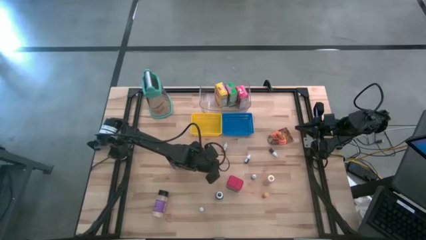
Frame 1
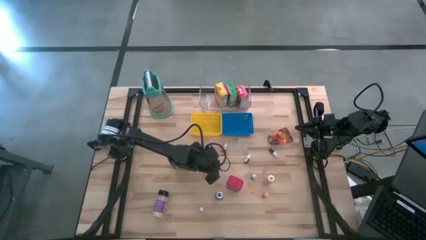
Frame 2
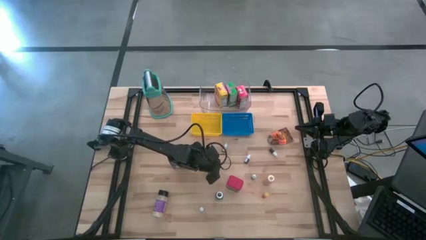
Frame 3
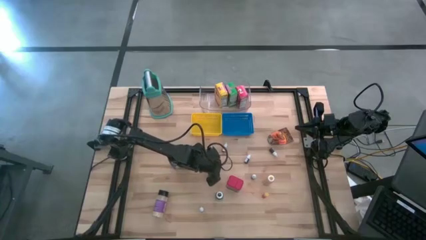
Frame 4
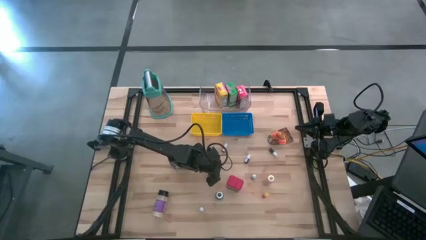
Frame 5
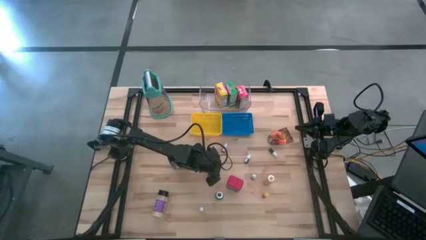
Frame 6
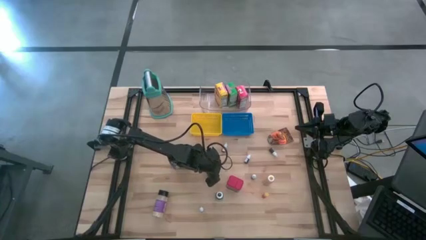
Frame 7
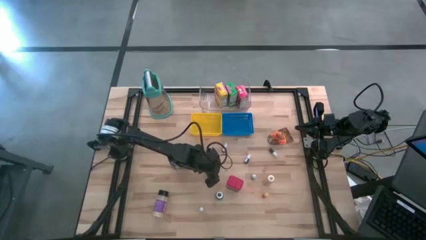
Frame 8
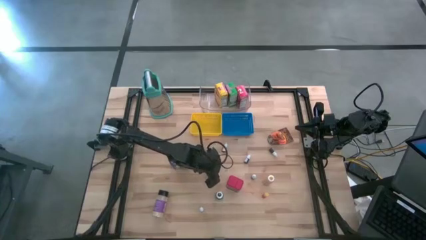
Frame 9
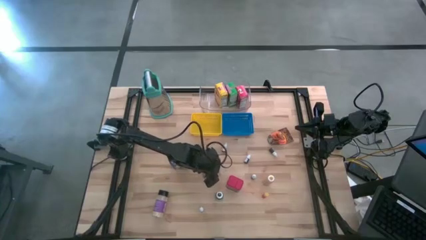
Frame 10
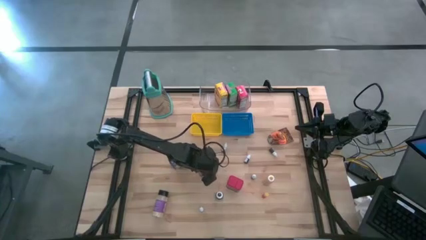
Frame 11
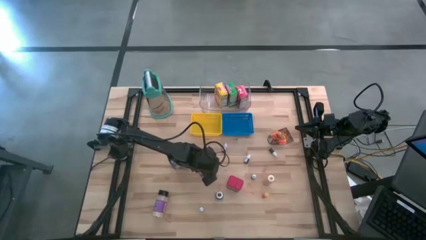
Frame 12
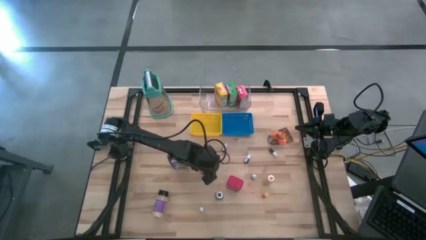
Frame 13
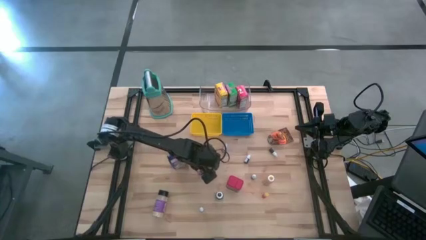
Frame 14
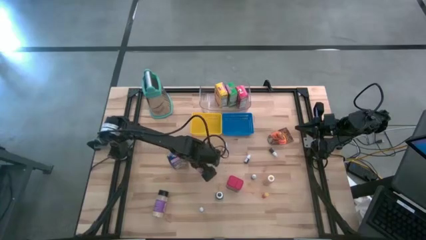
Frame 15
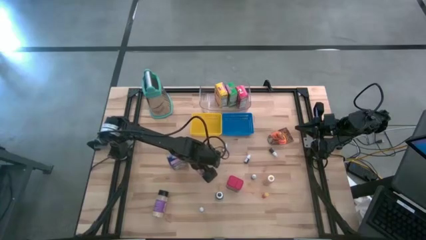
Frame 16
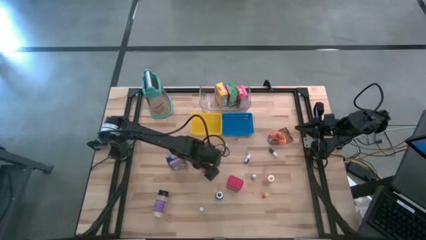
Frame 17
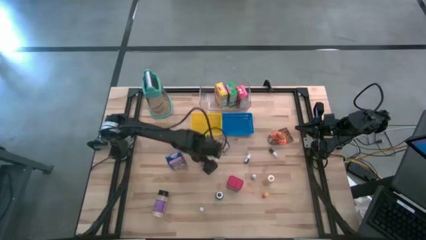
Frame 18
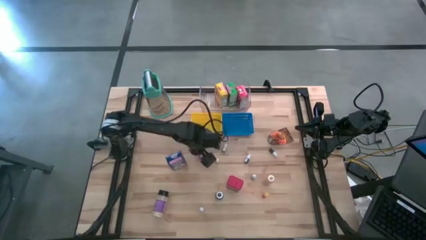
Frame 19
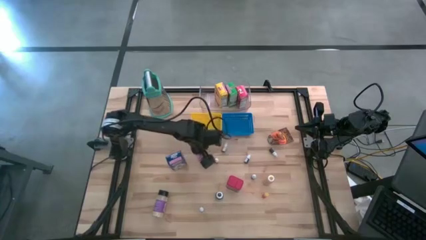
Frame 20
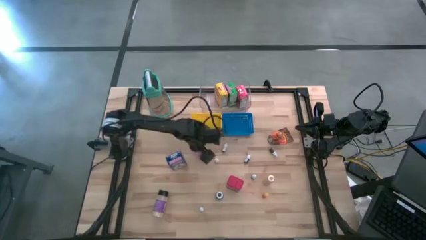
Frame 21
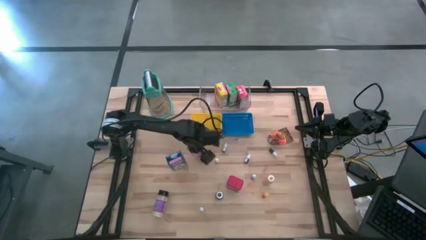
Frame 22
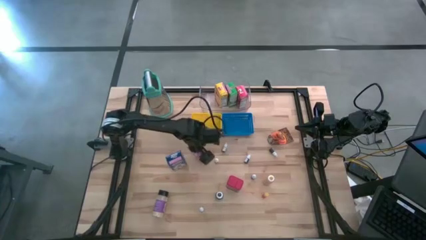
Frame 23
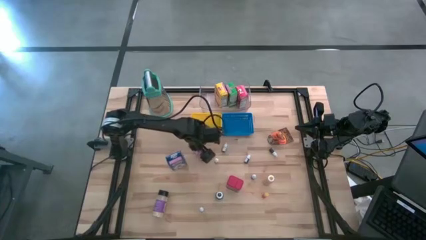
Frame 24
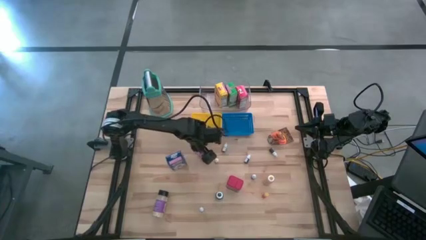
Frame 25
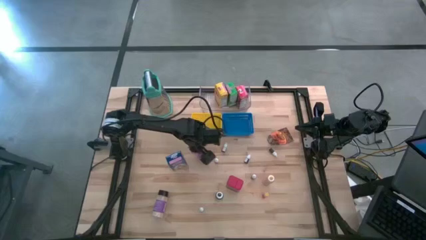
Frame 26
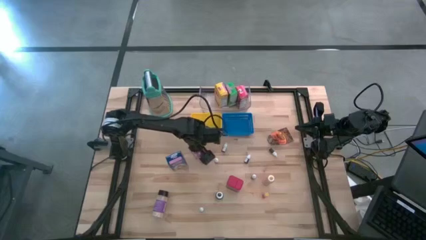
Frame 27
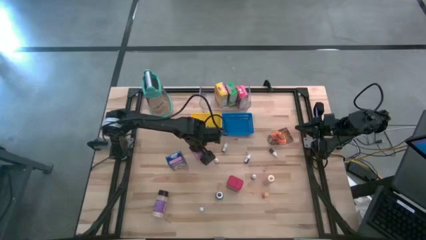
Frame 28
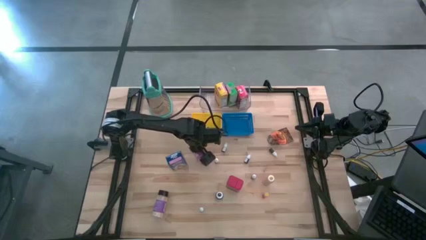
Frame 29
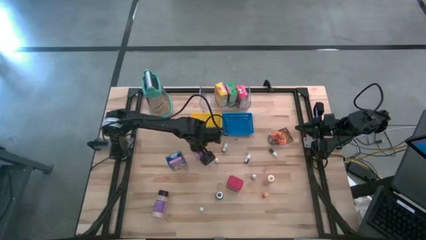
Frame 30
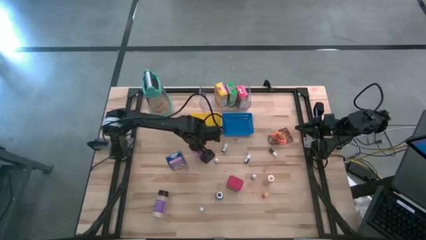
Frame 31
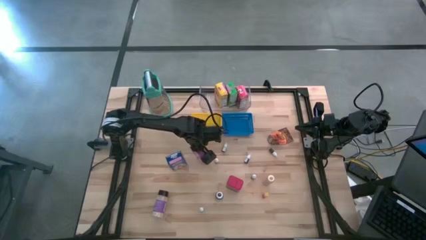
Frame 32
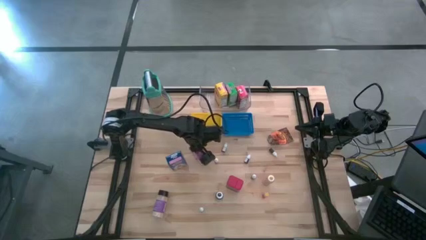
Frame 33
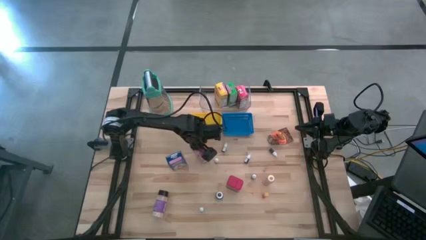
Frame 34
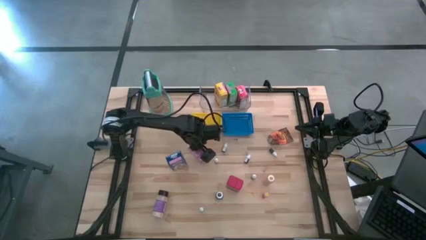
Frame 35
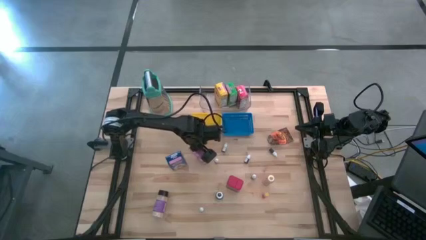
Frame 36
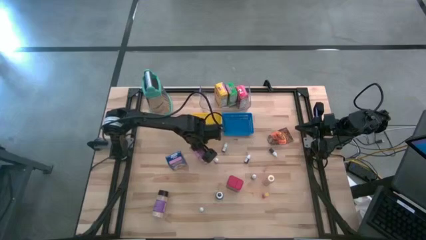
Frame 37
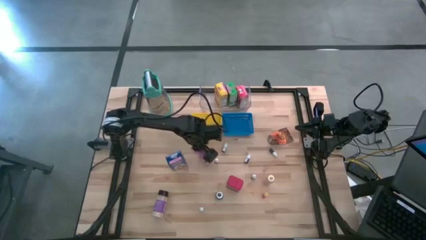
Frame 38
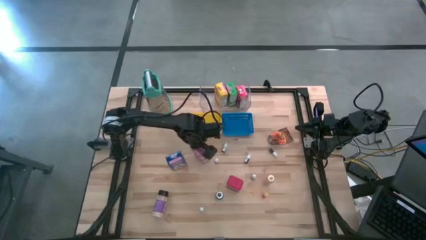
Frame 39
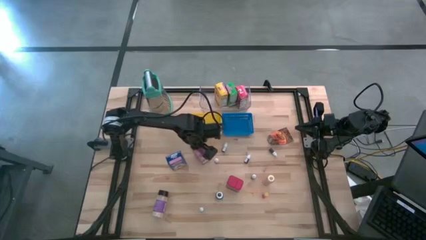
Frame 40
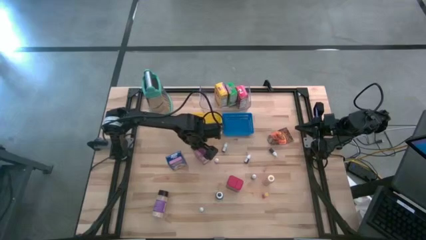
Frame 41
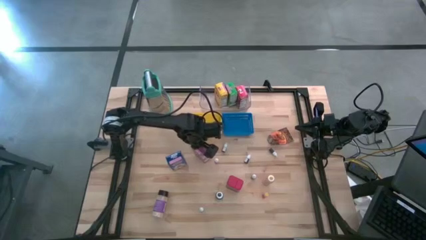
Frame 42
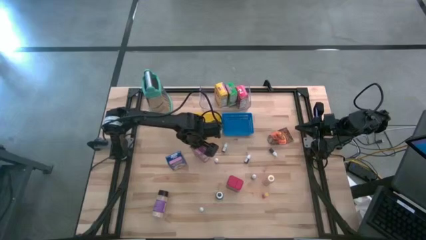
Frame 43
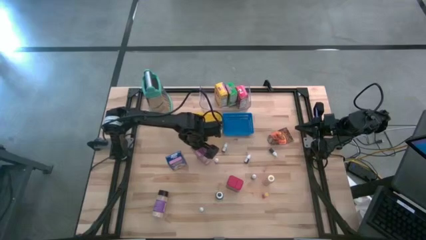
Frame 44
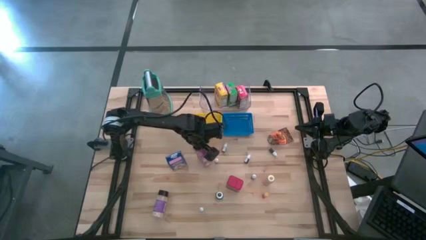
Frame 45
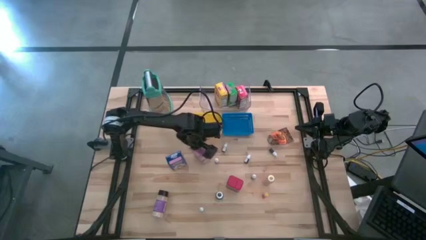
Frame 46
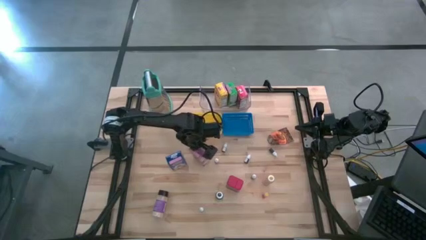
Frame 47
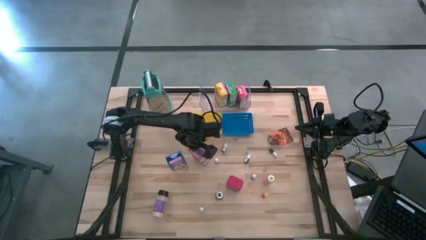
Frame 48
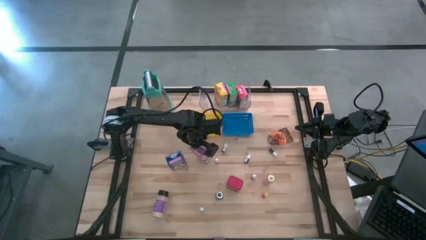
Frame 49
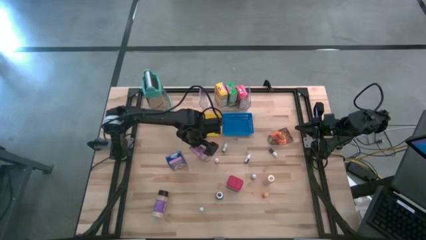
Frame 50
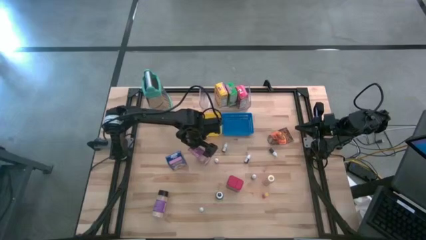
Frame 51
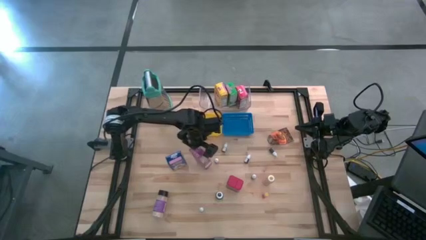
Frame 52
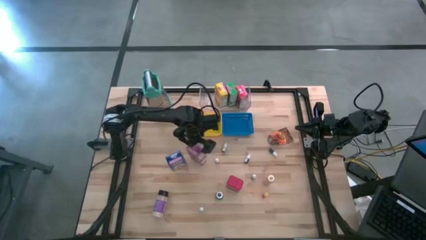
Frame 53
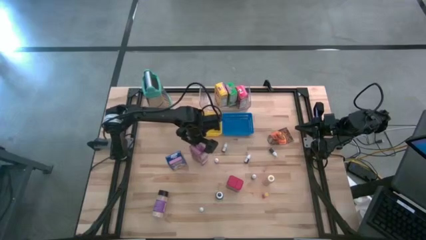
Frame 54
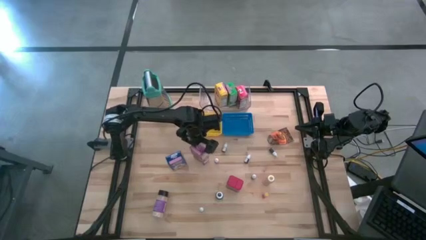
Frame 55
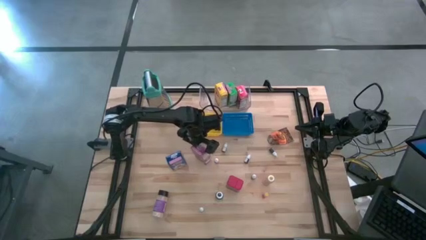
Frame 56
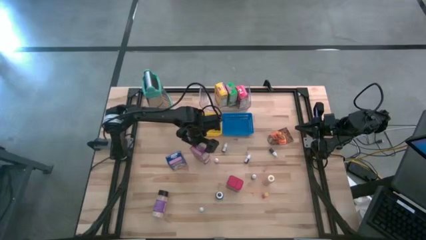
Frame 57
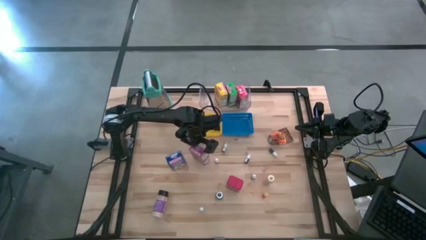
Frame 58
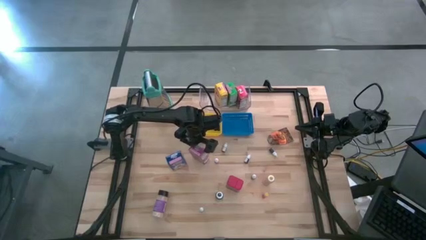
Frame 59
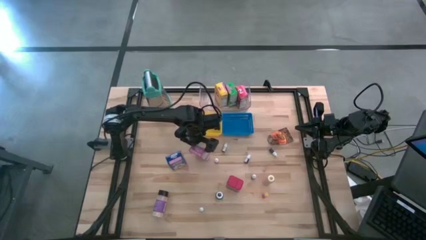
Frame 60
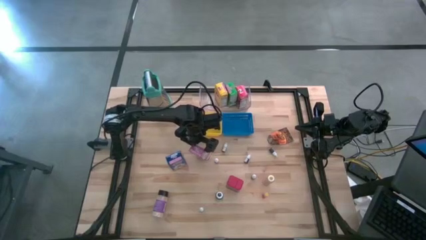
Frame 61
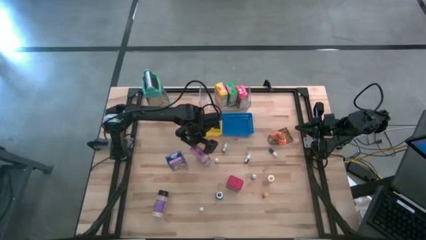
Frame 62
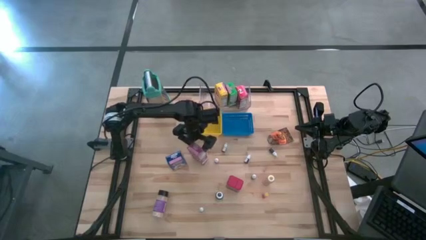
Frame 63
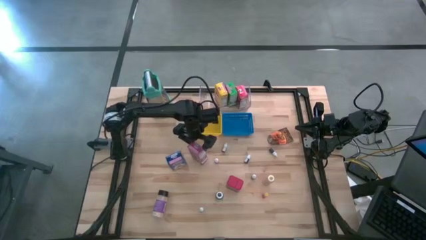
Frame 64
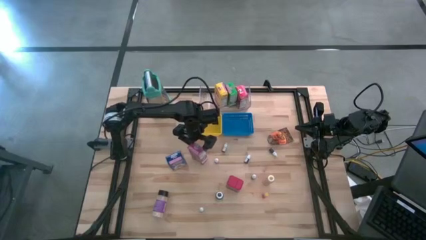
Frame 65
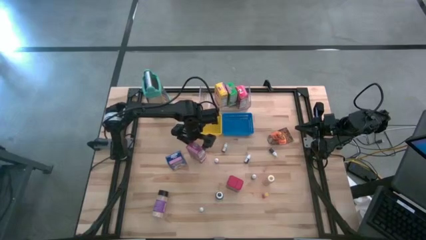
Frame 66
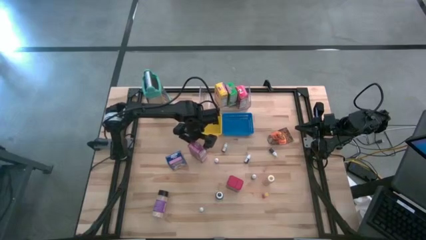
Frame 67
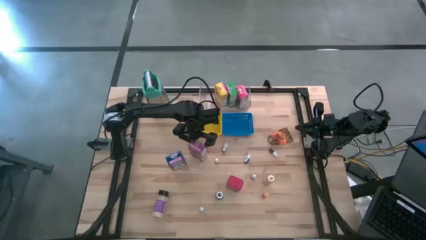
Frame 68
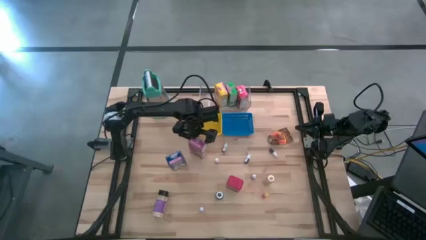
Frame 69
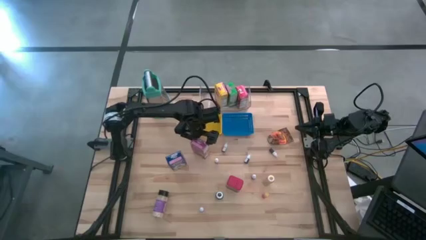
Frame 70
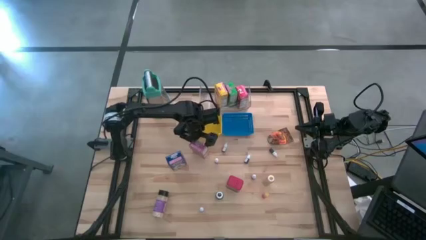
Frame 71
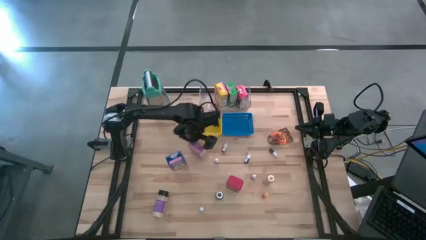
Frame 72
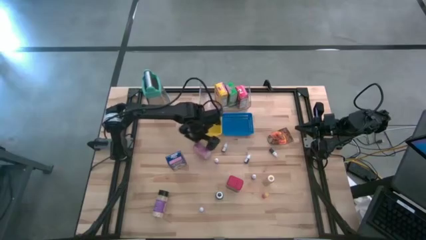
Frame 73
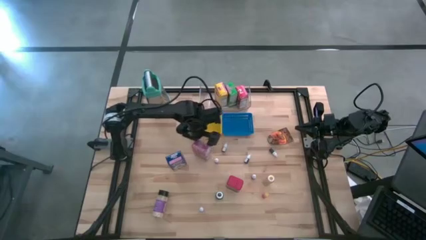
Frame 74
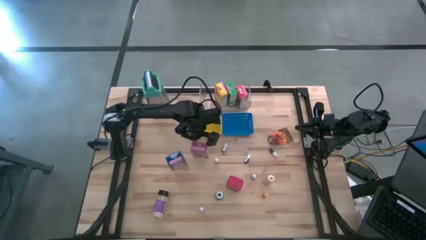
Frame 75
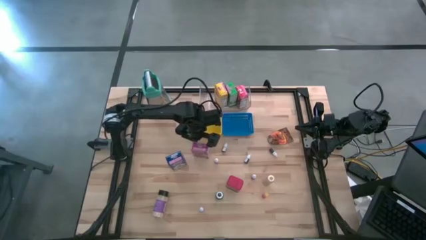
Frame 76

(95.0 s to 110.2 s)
Task: Pick & Place Kitchen Items
Adjust the cereal boxes on the table
